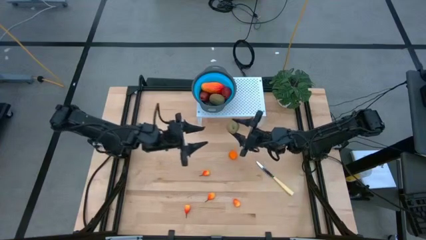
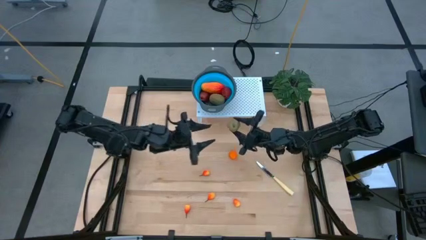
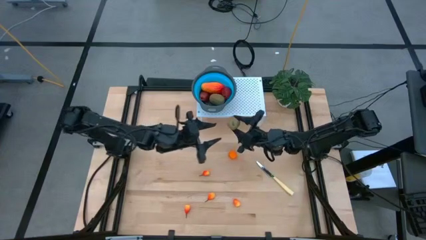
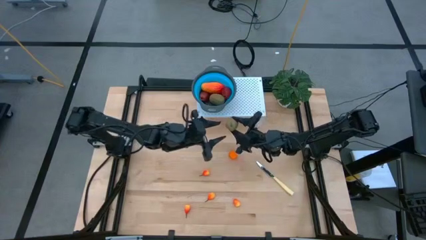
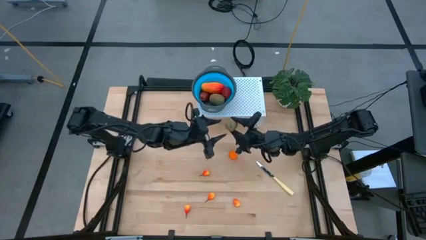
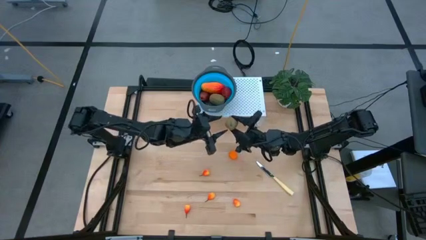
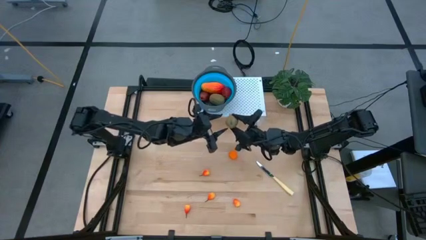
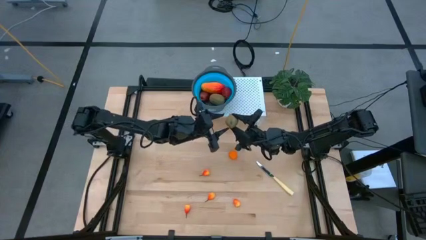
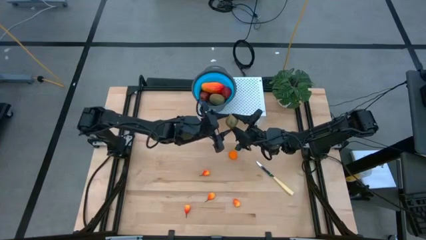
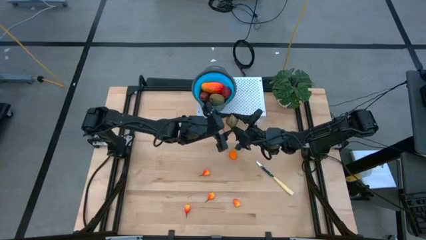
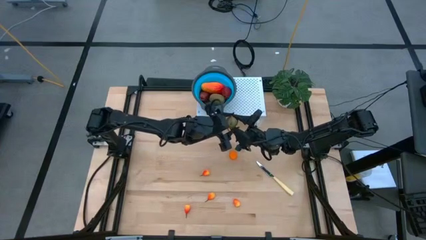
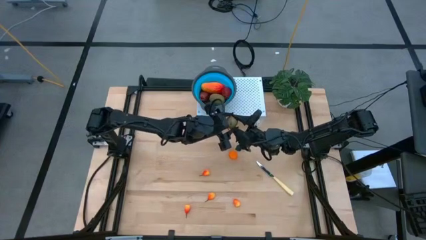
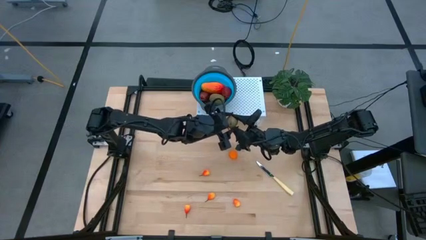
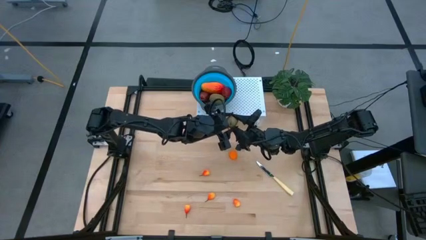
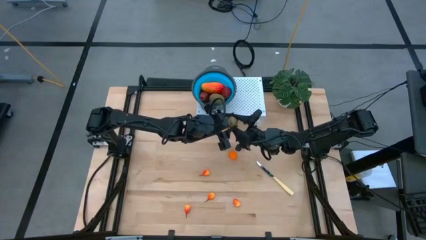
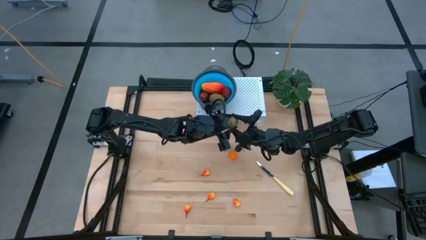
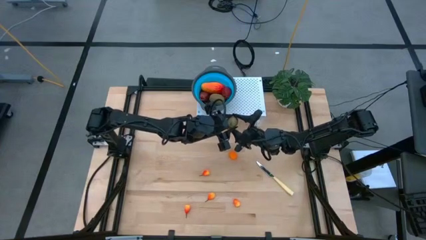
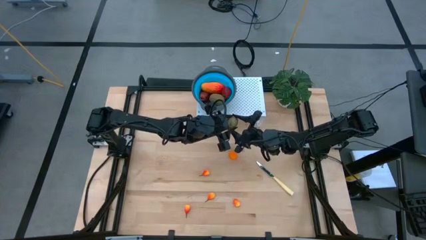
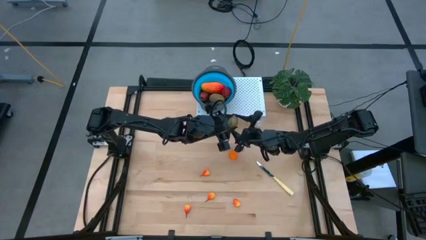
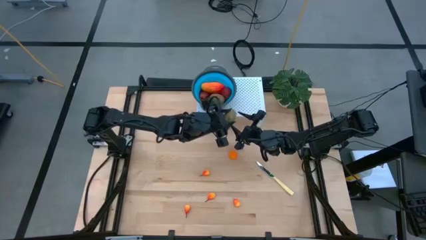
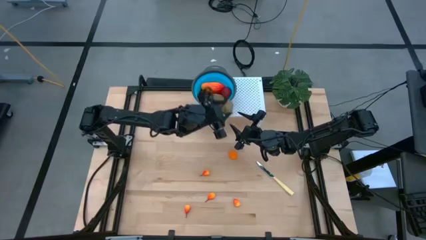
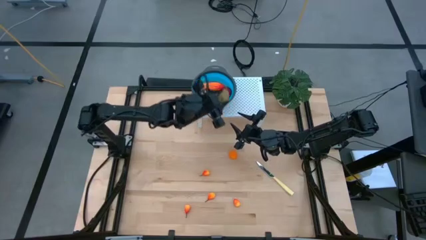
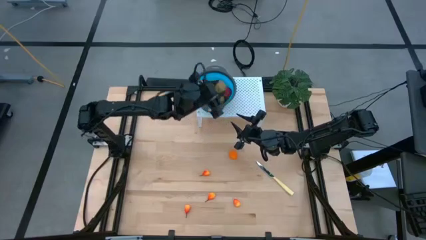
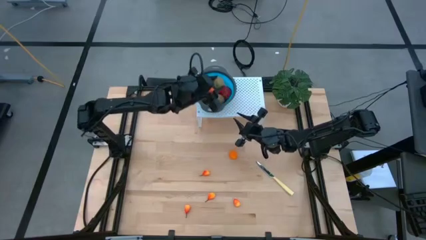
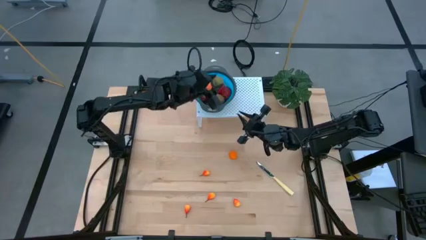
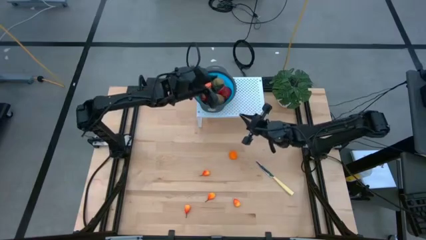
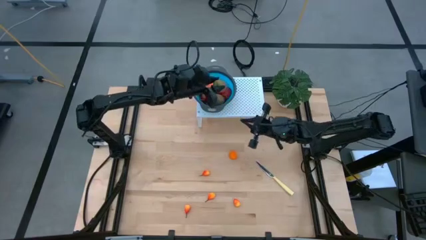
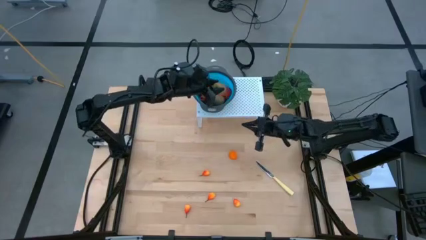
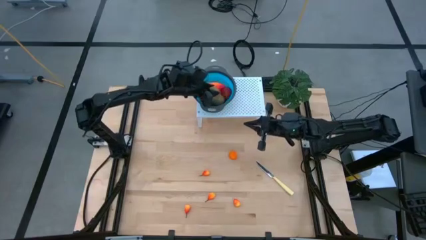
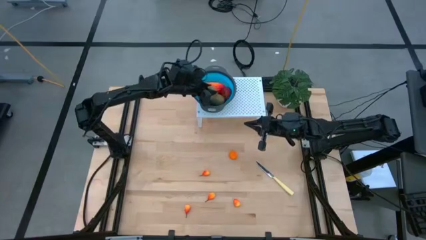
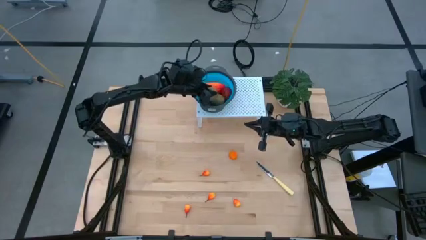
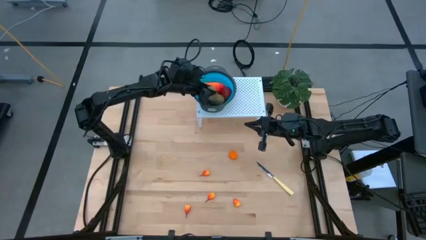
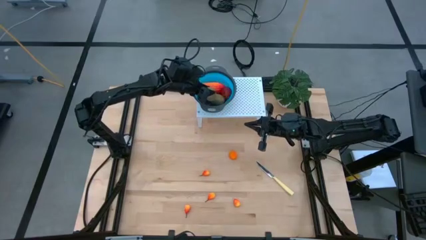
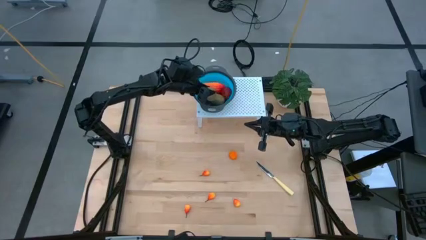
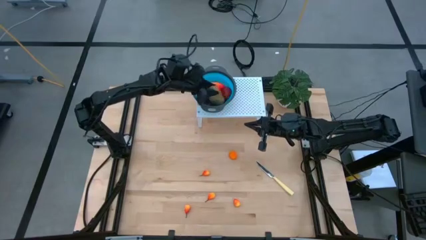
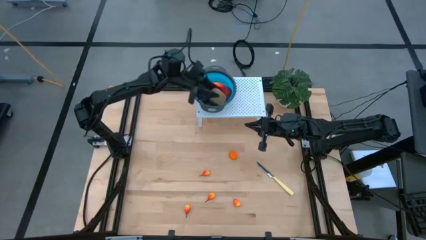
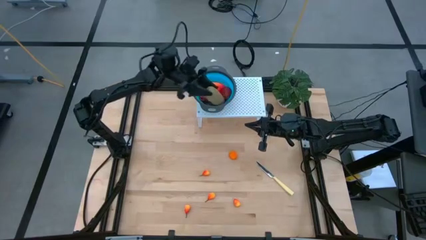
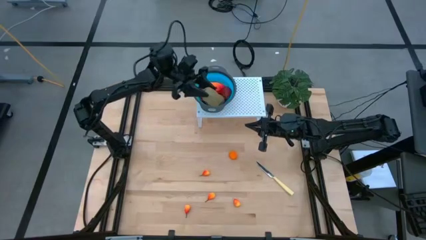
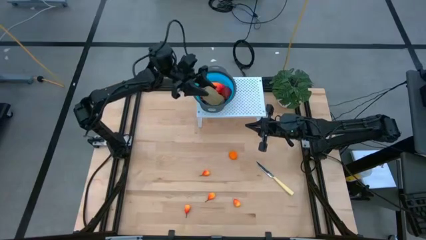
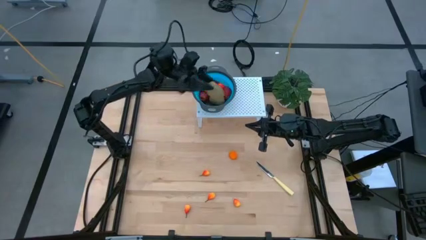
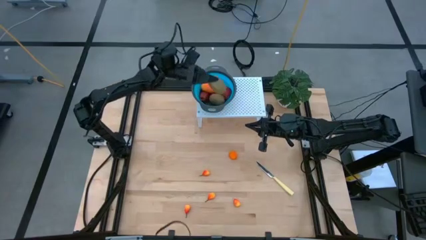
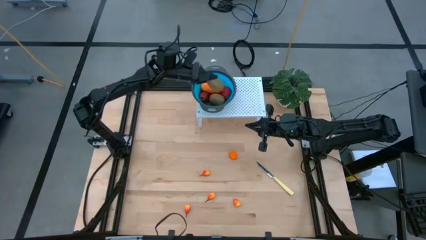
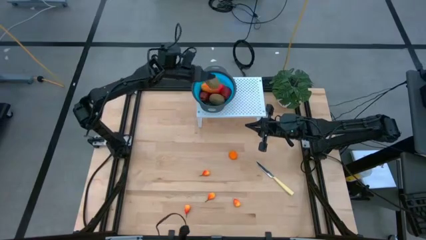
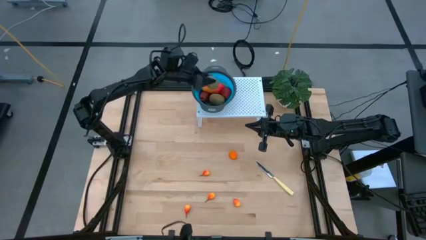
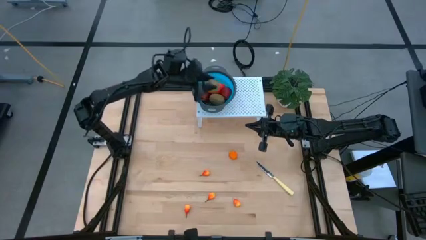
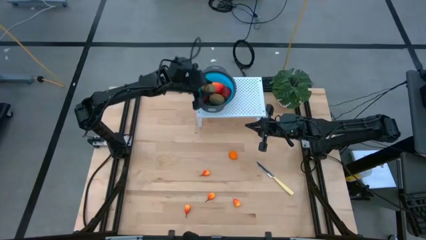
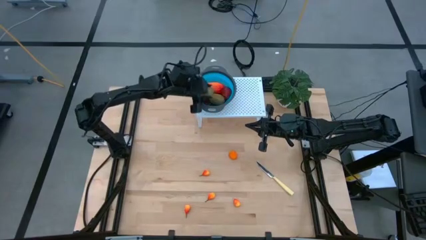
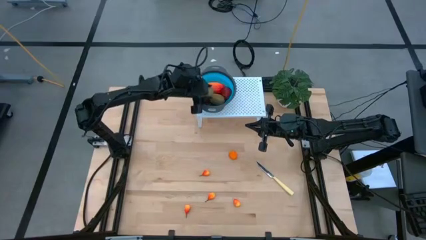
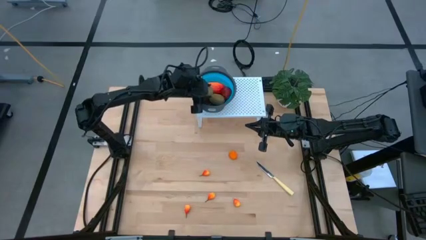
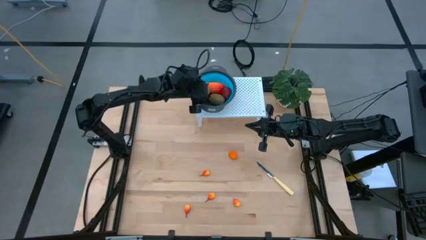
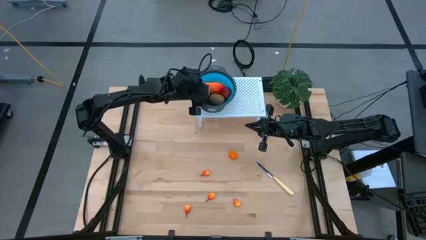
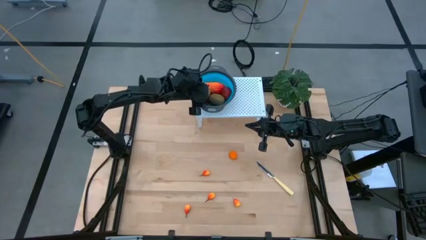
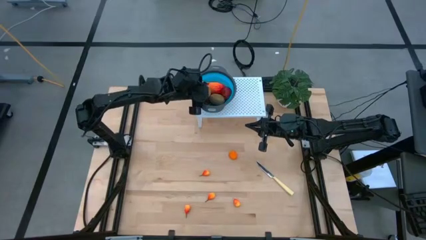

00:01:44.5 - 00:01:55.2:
Task: Pick & Place Fruit
Put the kiwi into the blue strainer bowl on the shelf

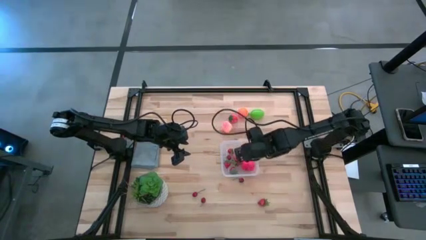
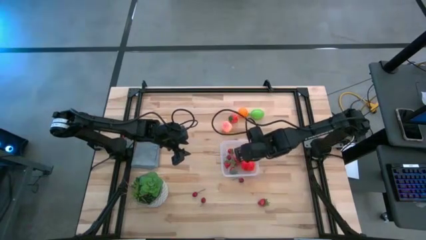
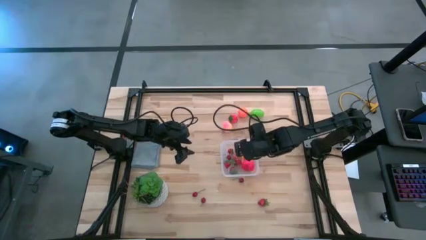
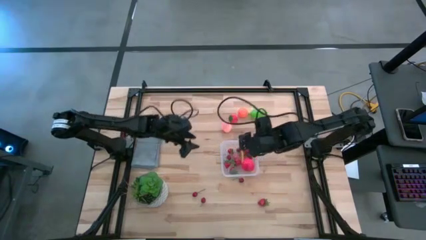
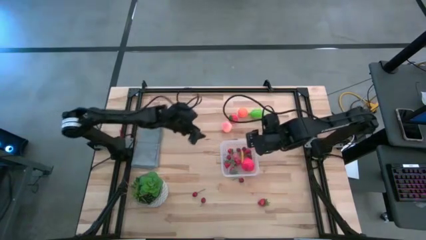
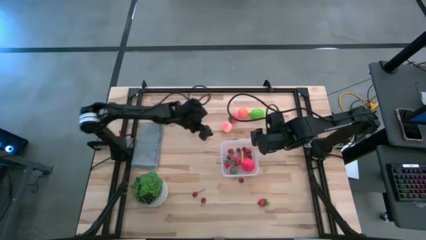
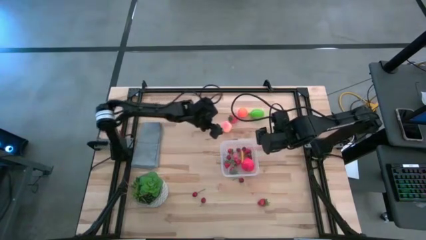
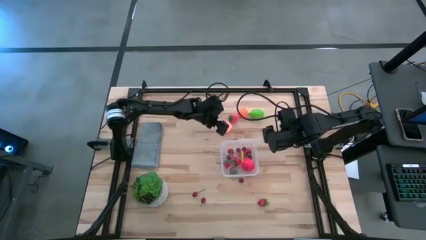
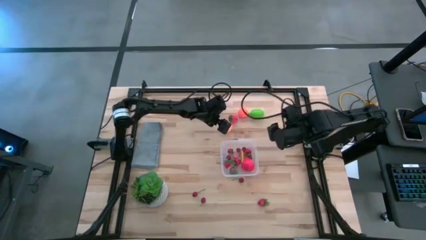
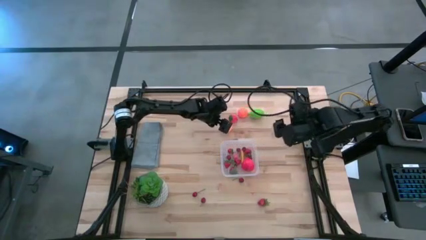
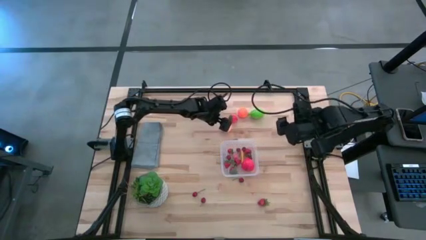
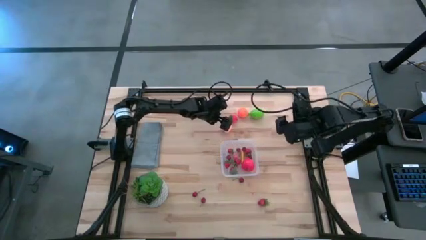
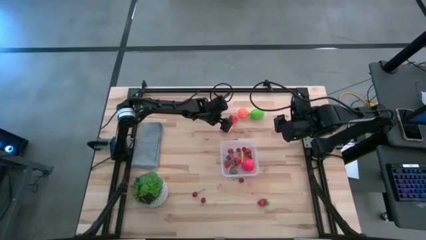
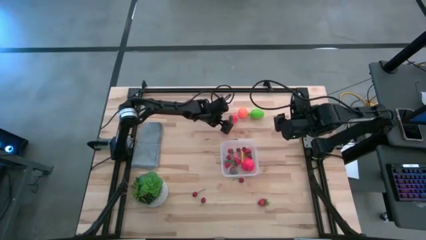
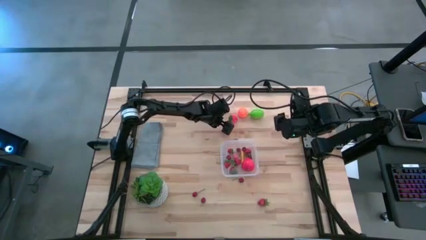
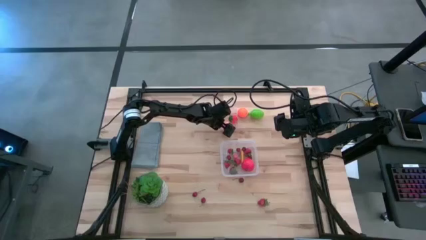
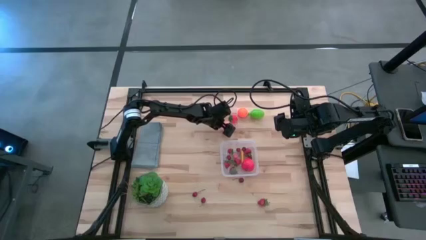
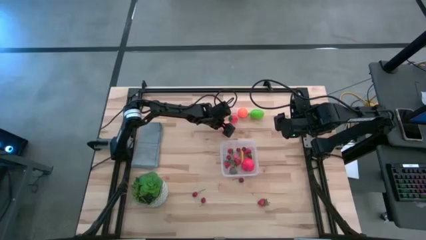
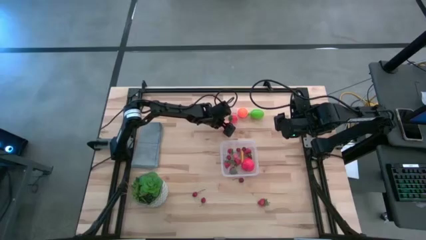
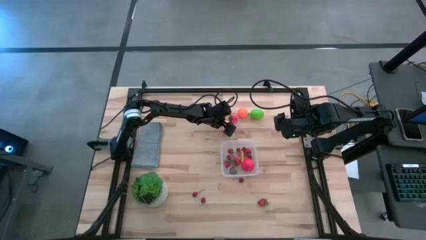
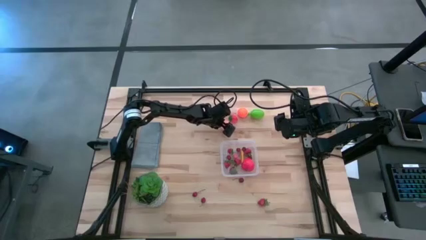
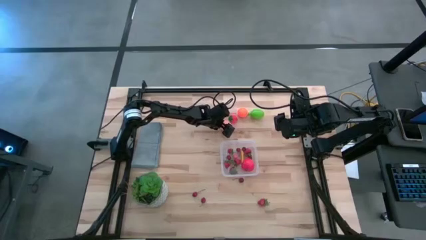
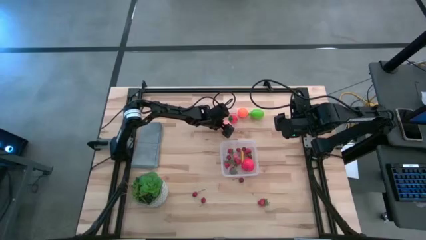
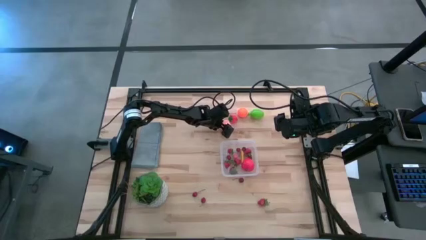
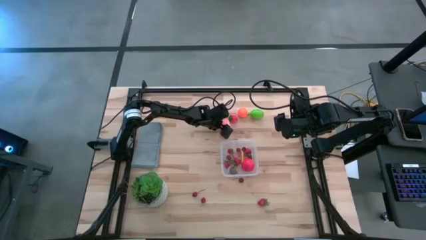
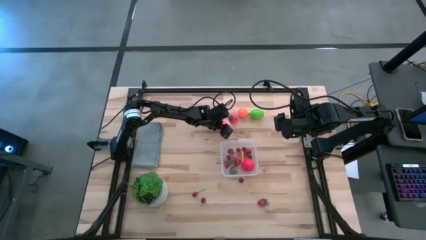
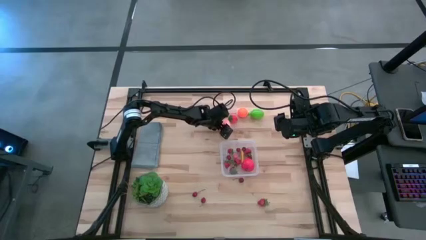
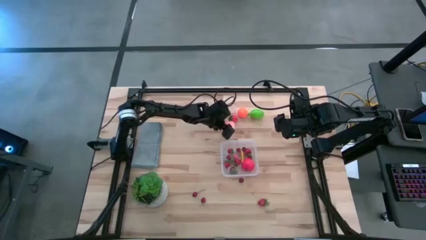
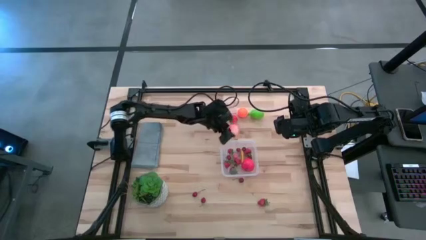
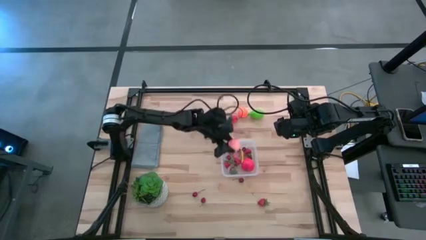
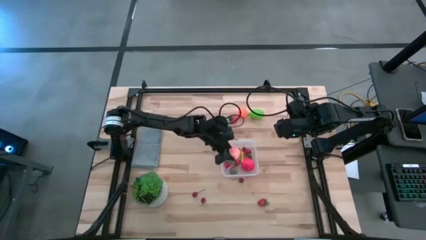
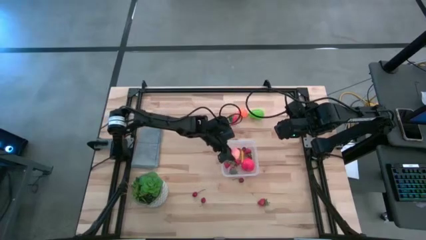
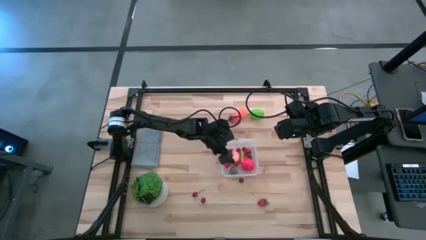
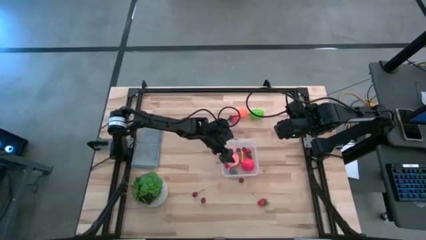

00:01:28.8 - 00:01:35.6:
Task: Pick and placing Produce into tupperware
Put the peach into the transparent bin
